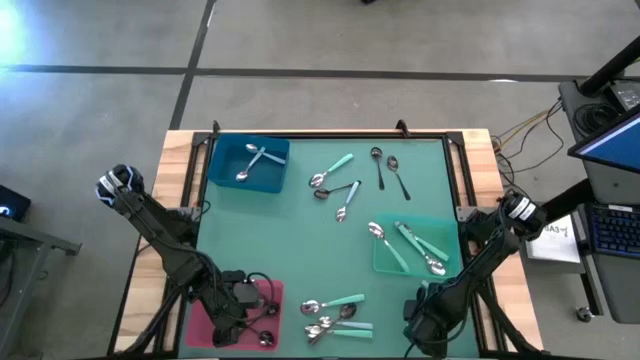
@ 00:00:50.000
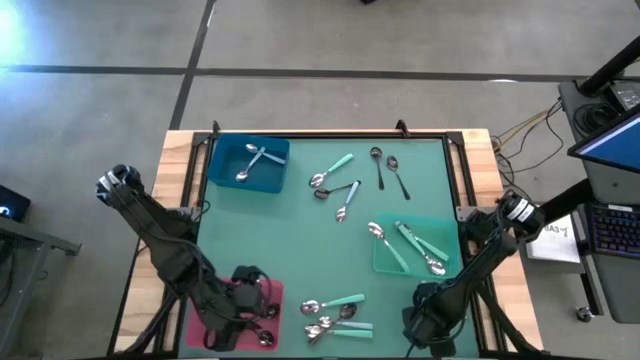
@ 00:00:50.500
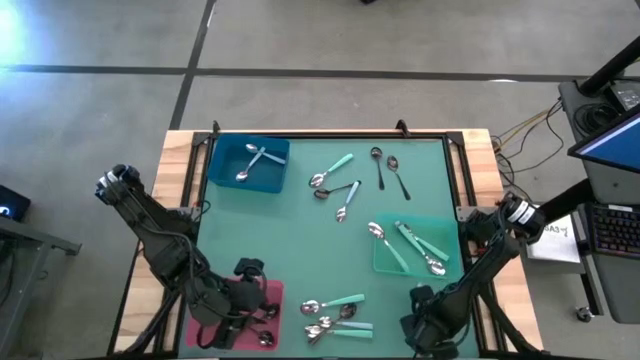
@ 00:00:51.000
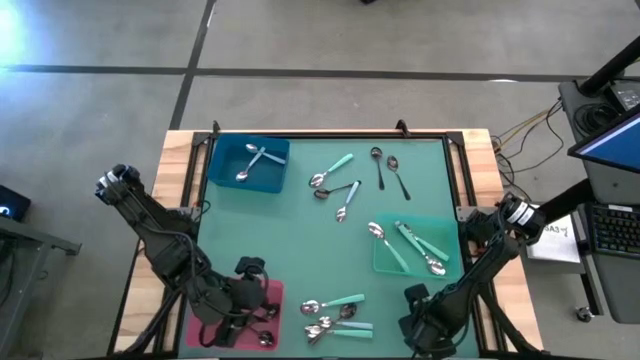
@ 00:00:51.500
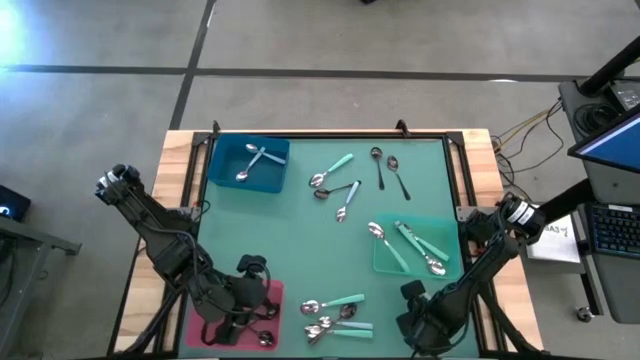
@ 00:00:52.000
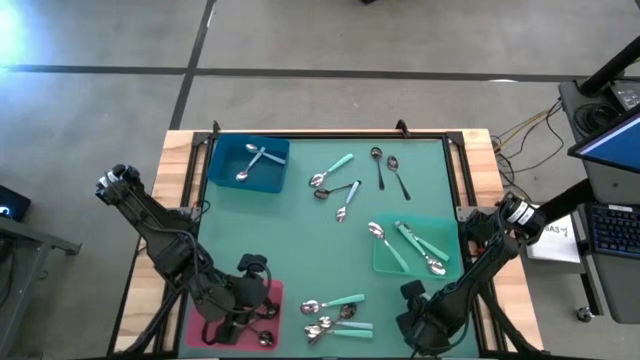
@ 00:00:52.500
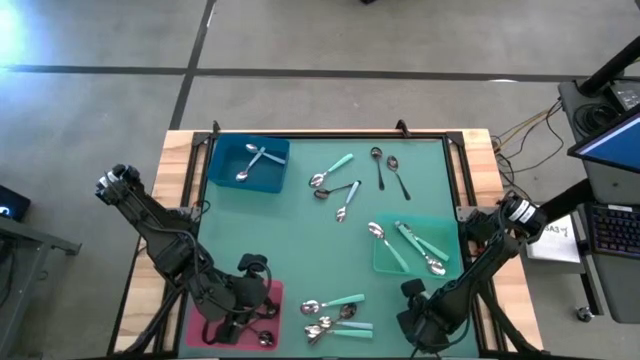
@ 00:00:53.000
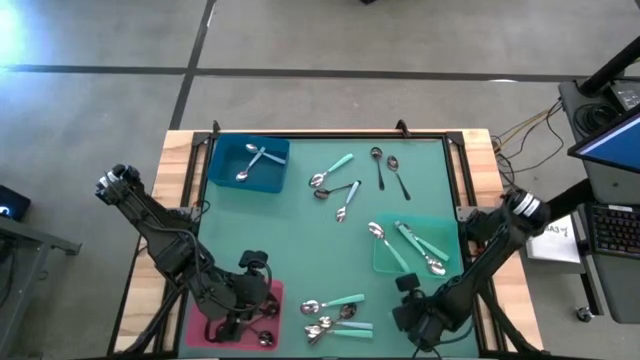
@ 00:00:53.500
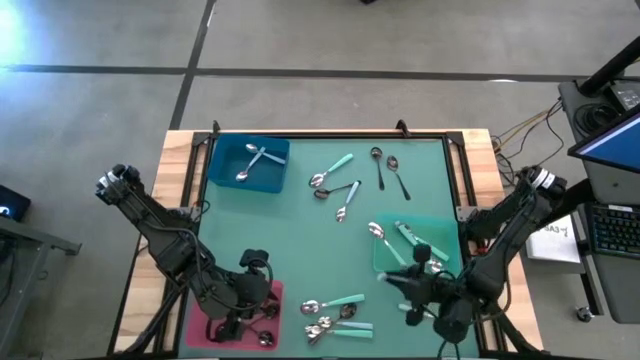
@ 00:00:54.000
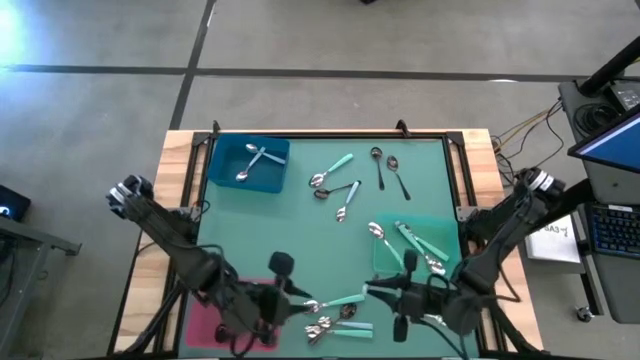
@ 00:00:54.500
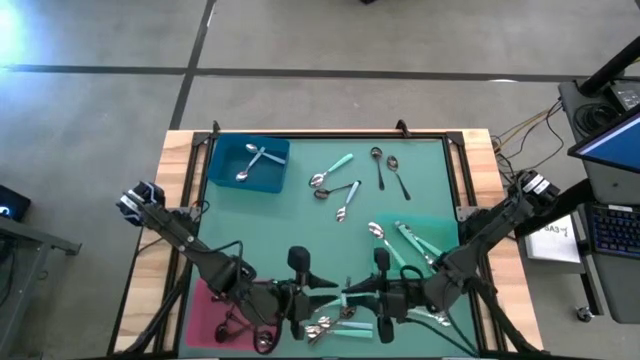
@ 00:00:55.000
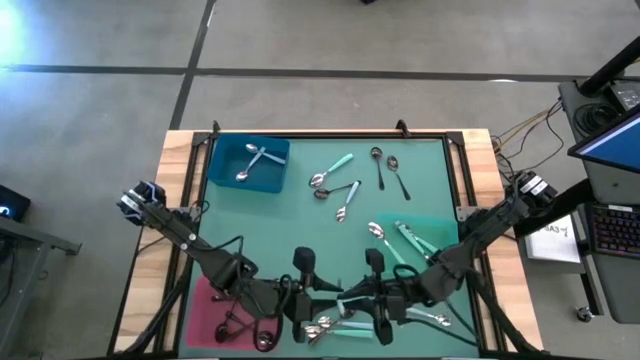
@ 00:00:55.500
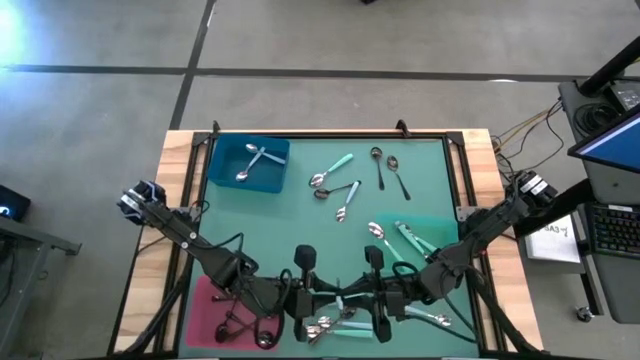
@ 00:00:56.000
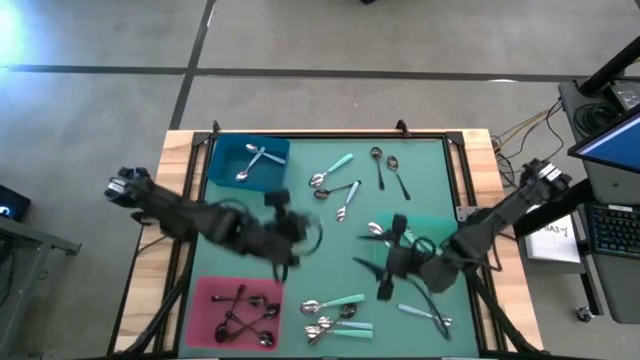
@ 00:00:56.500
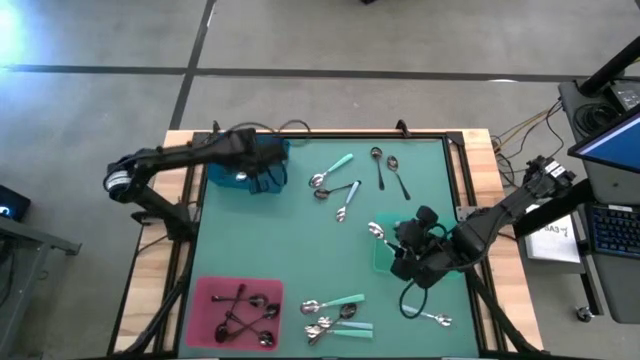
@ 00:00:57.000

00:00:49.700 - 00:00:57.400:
Task: Sort silverware by color (type)
Put the blue spoon into the blue bin

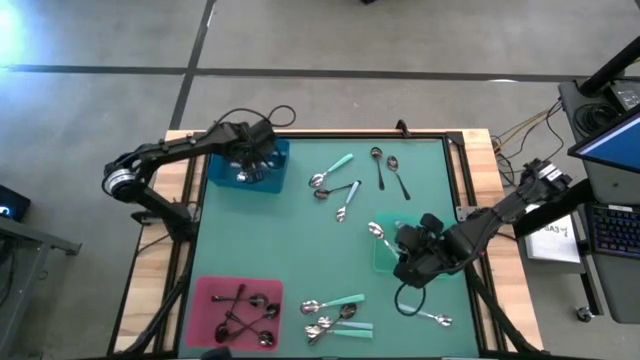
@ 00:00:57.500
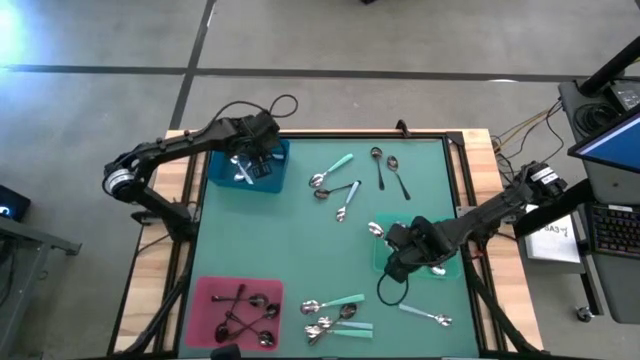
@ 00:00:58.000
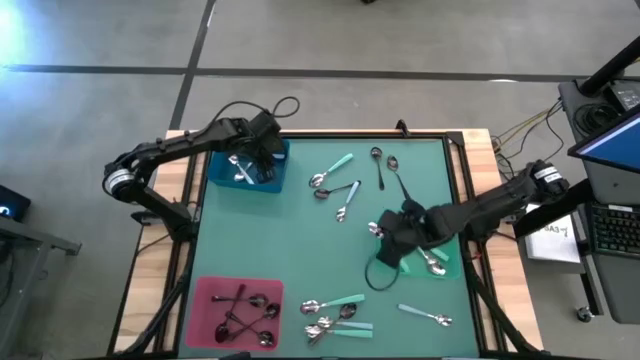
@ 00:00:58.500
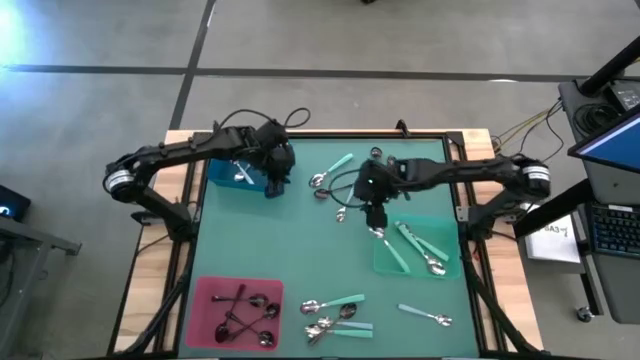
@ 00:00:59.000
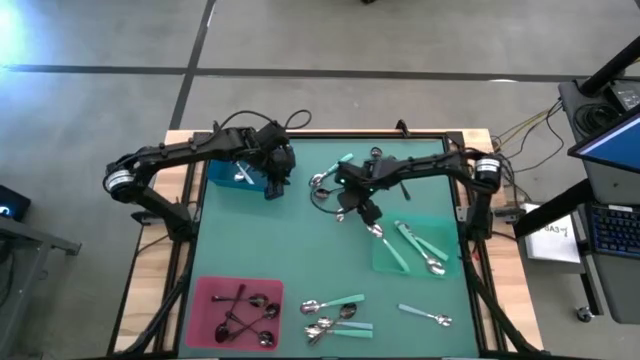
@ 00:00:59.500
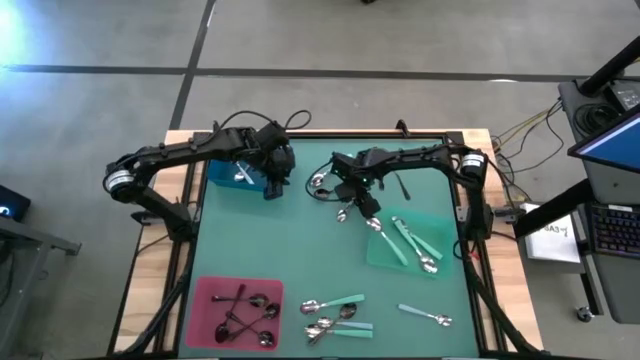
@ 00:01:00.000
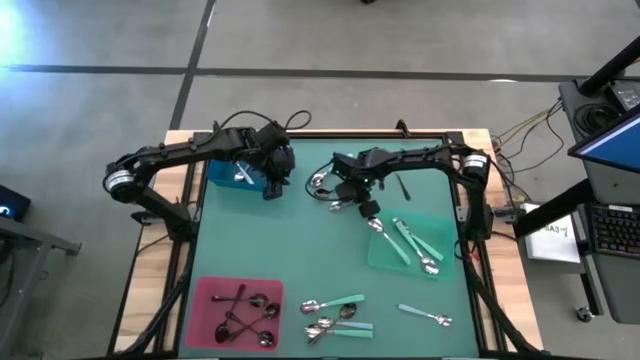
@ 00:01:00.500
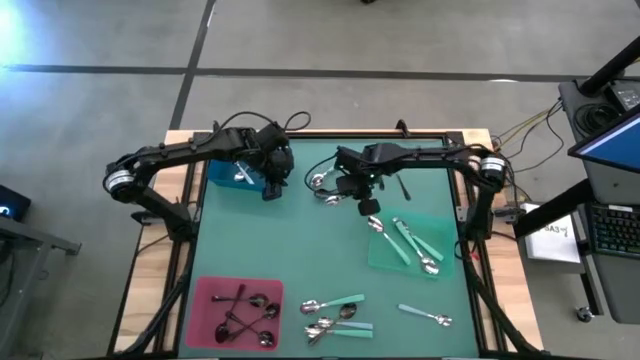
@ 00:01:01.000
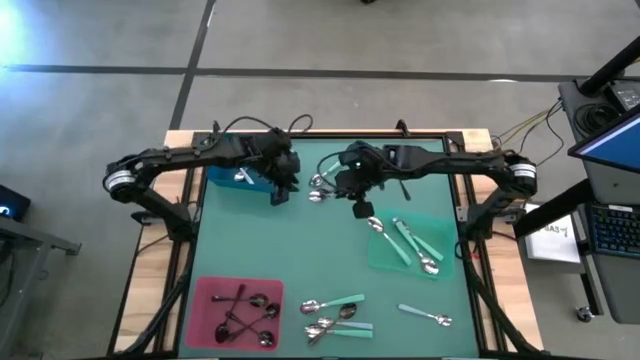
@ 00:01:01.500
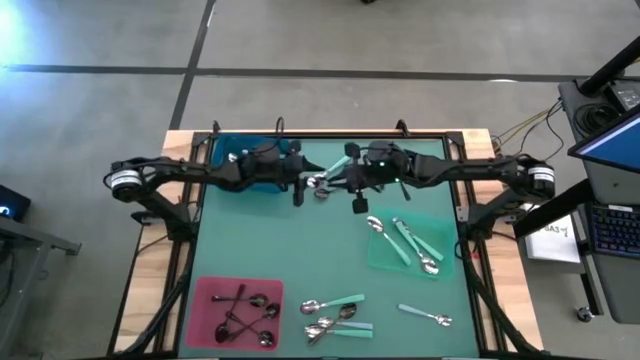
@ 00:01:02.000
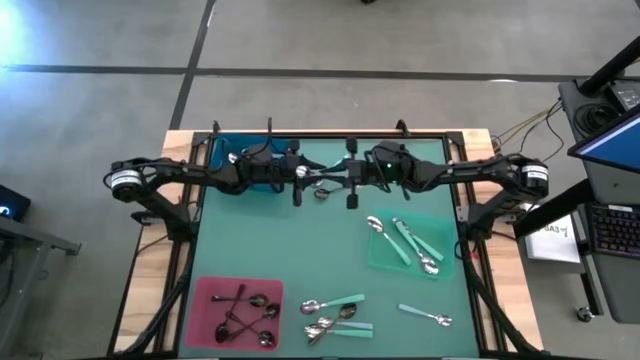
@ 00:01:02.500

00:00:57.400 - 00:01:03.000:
Put the top blue spoon into the blue bin

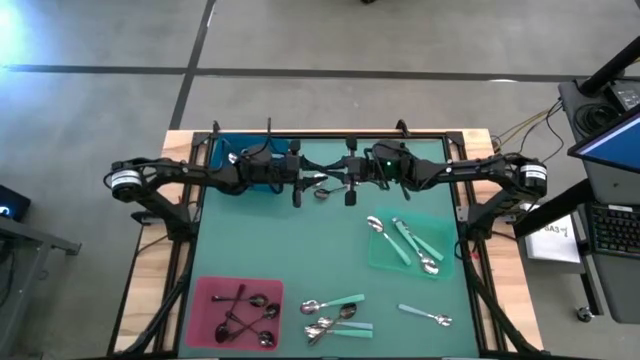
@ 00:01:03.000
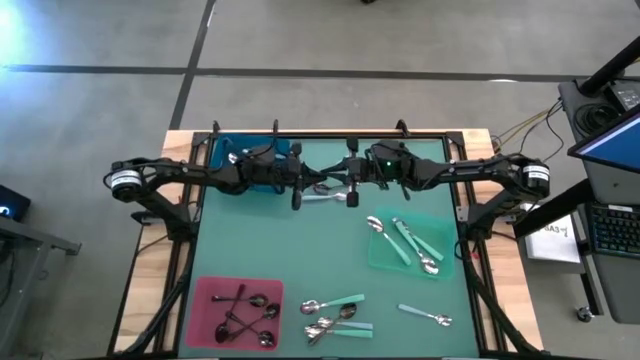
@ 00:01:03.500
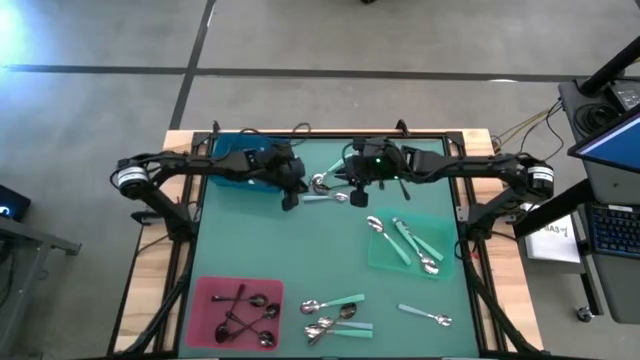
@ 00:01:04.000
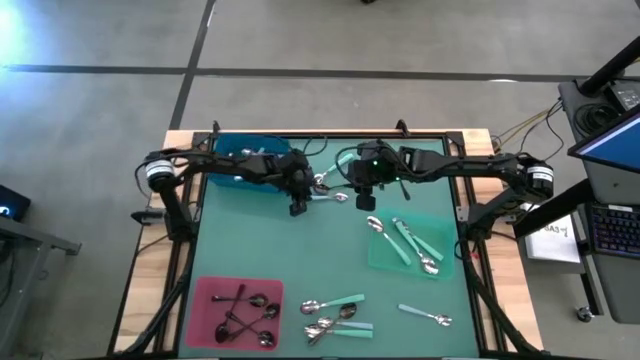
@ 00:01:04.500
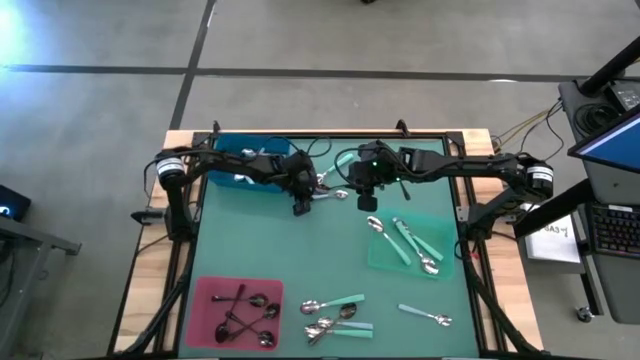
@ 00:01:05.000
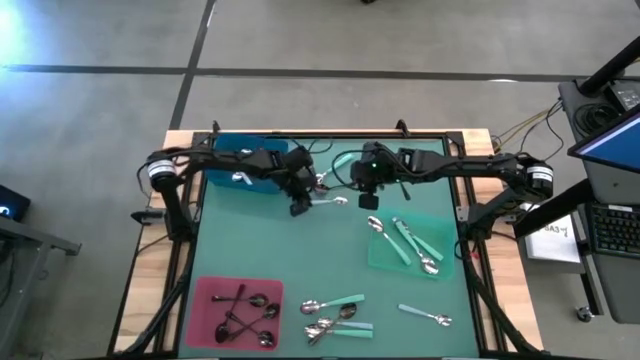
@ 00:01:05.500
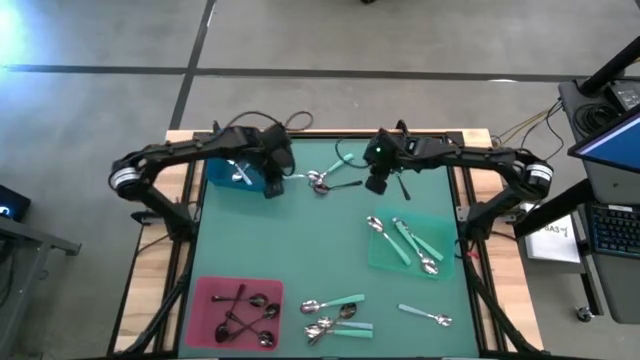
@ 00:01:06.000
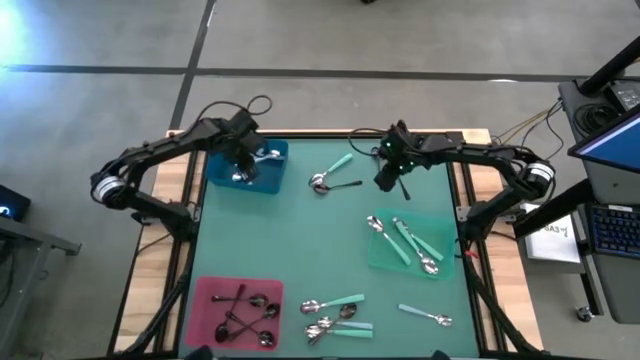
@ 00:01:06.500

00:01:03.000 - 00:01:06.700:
Put the top blue spoon into the blue bin

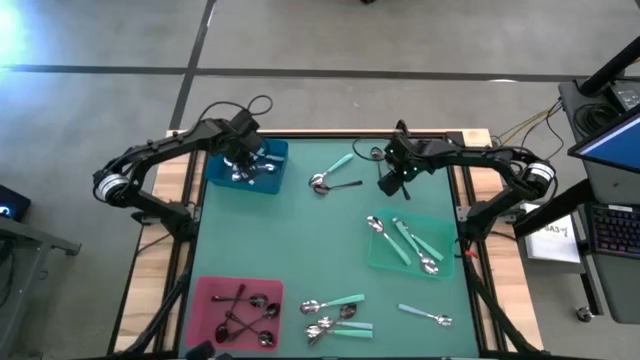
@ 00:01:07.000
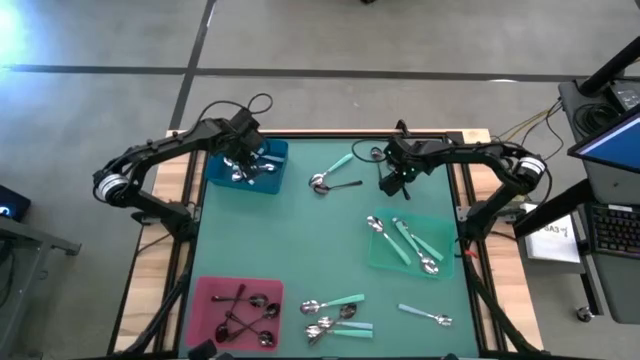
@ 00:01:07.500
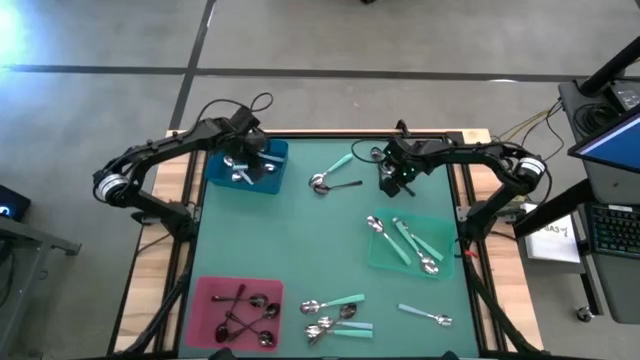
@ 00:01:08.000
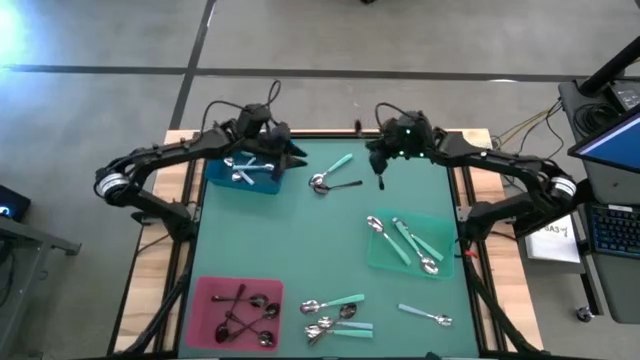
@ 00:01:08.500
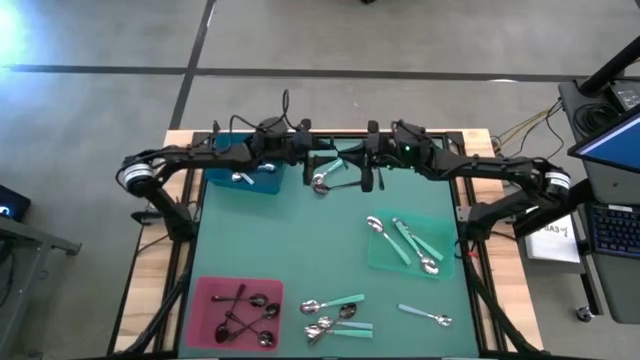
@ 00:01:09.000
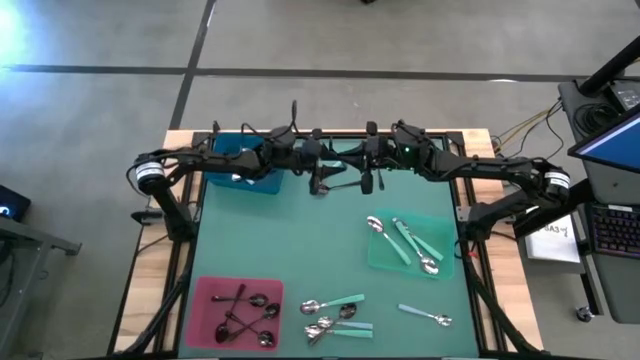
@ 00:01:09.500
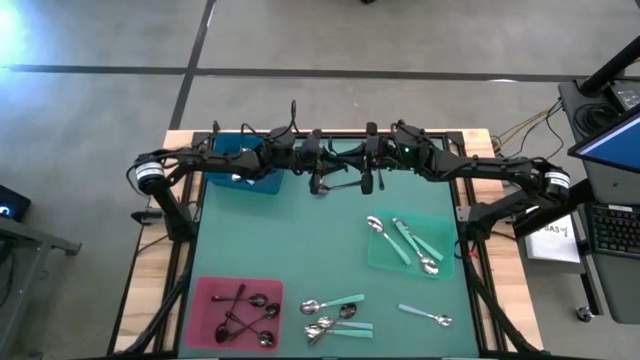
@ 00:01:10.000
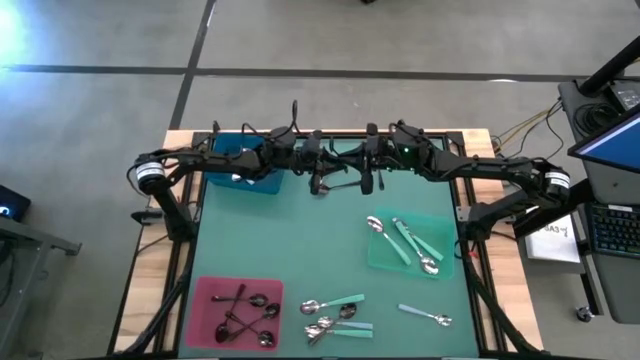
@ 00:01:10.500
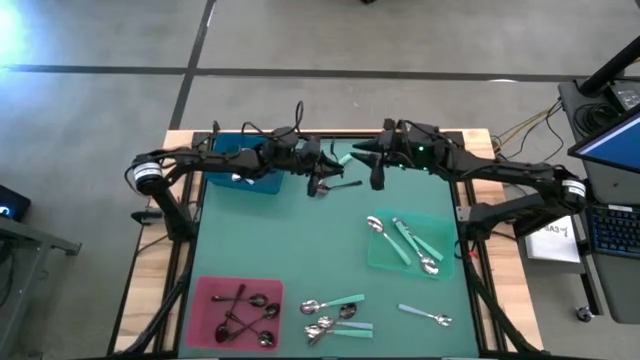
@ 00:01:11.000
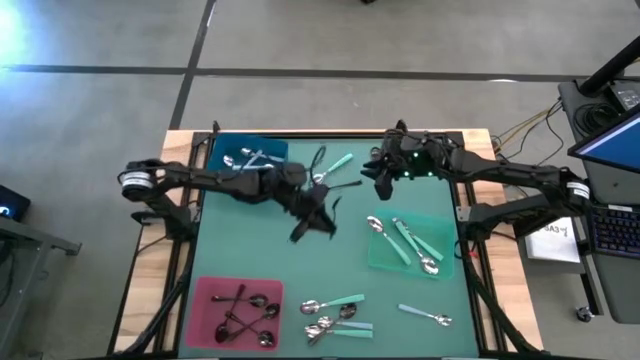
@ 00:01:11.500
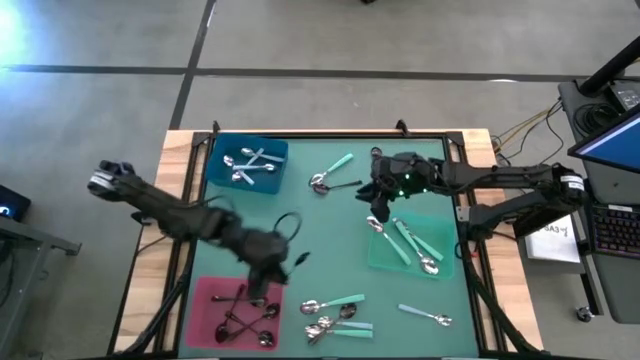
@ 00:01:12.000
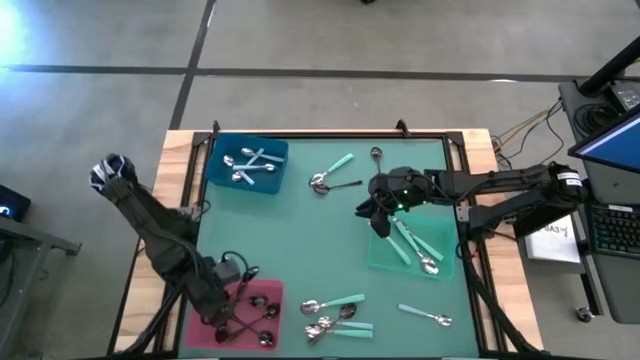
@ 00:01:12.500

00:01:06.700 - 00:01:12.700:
Put the black spoon into the pink bin
